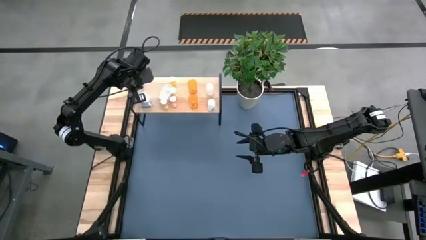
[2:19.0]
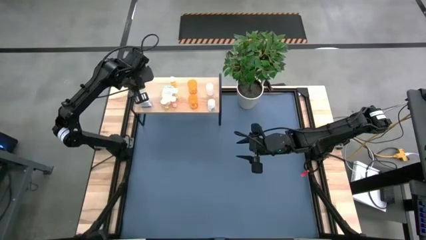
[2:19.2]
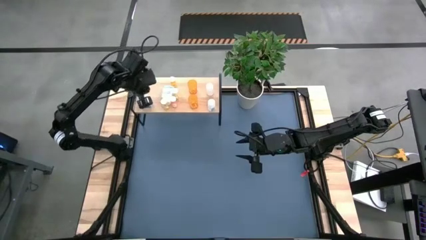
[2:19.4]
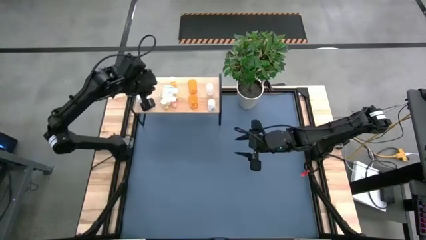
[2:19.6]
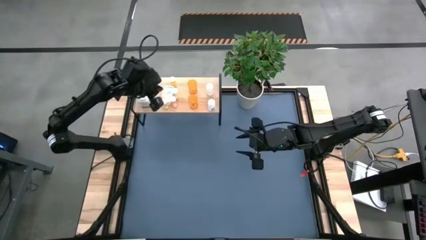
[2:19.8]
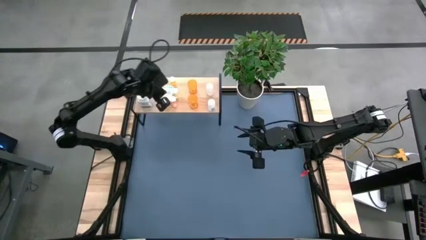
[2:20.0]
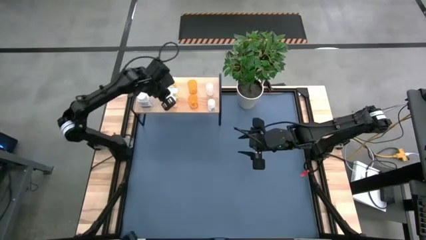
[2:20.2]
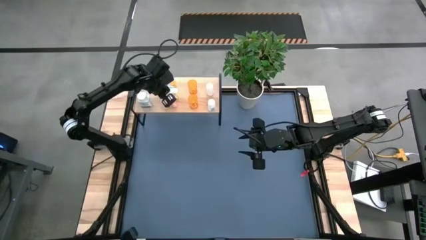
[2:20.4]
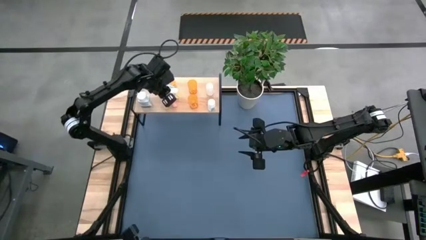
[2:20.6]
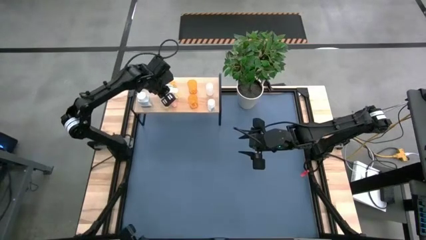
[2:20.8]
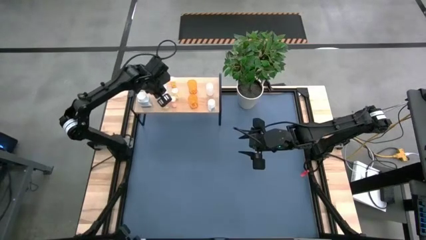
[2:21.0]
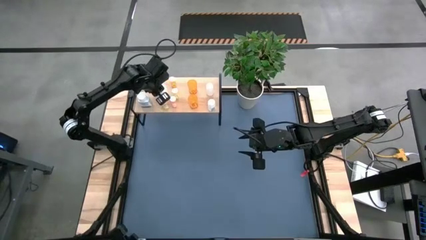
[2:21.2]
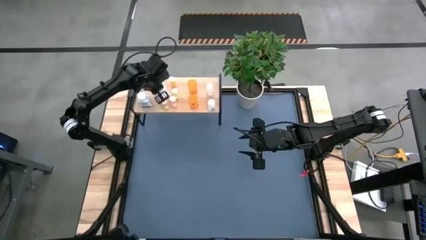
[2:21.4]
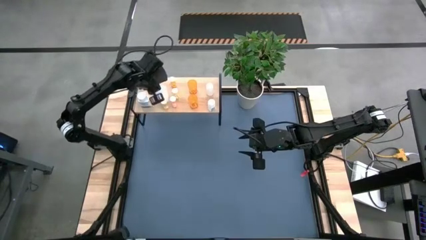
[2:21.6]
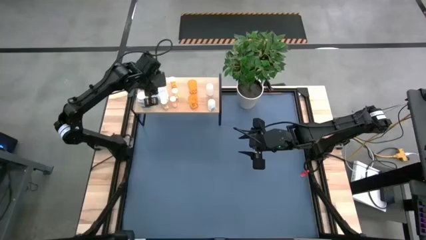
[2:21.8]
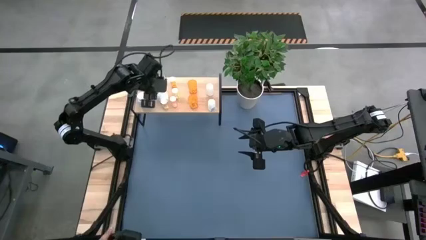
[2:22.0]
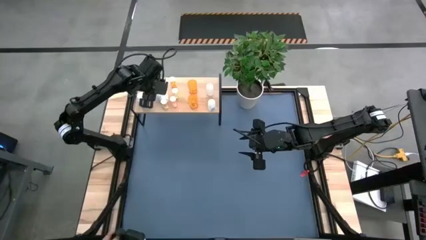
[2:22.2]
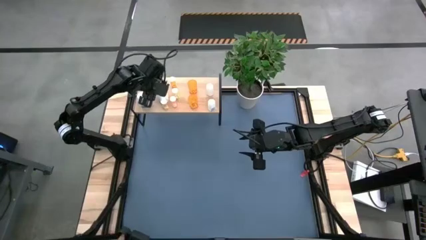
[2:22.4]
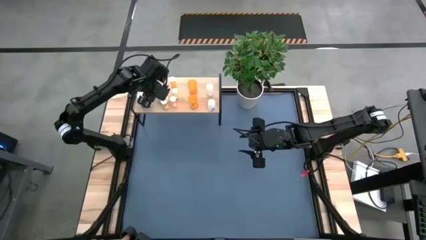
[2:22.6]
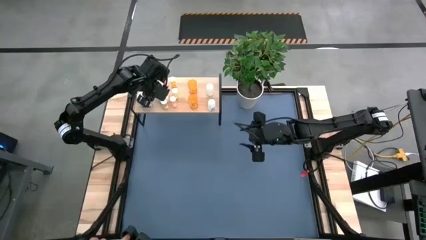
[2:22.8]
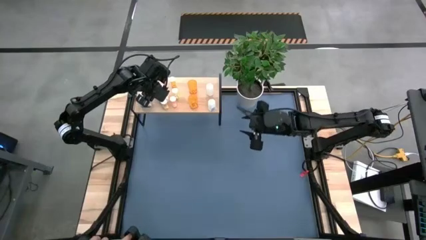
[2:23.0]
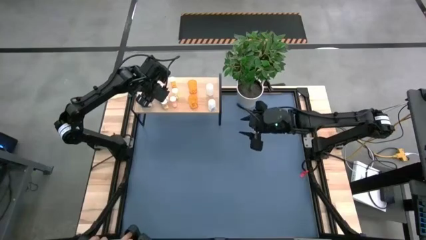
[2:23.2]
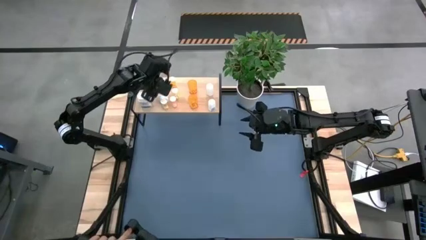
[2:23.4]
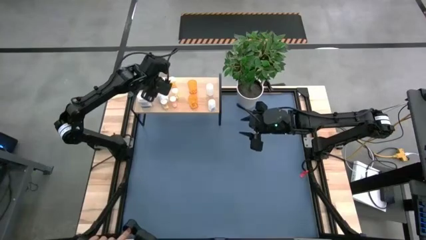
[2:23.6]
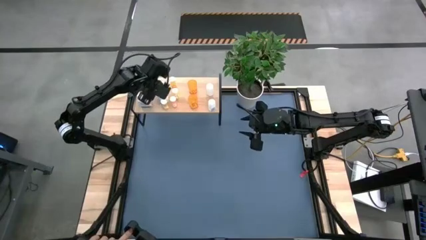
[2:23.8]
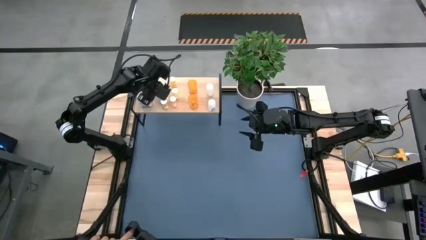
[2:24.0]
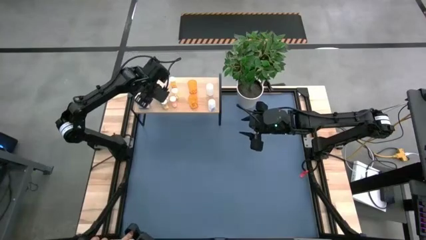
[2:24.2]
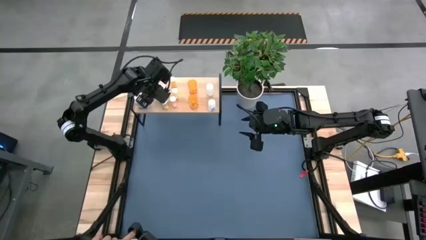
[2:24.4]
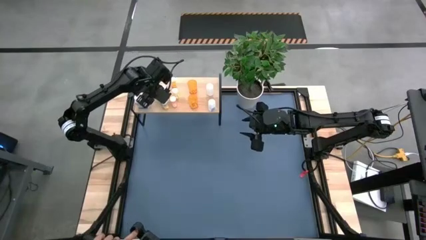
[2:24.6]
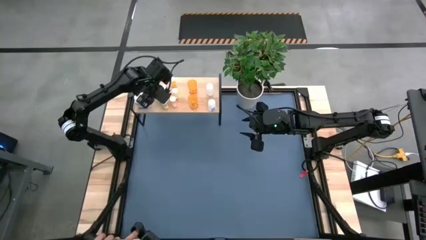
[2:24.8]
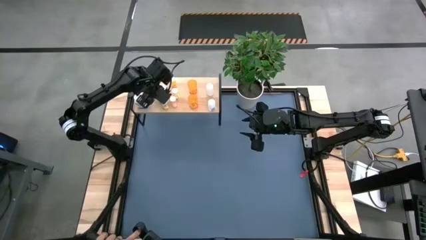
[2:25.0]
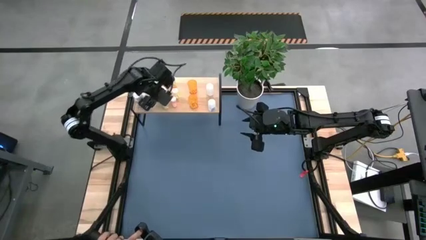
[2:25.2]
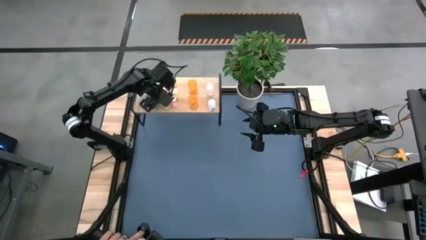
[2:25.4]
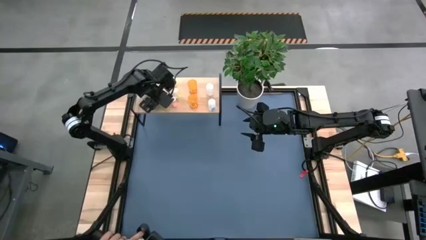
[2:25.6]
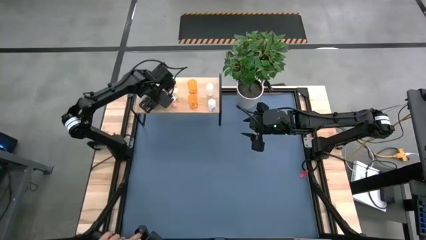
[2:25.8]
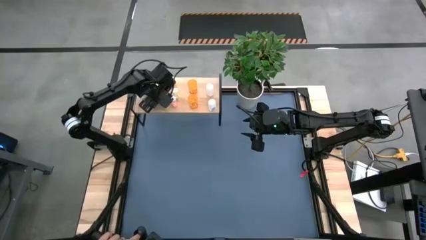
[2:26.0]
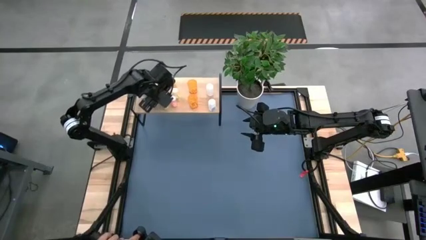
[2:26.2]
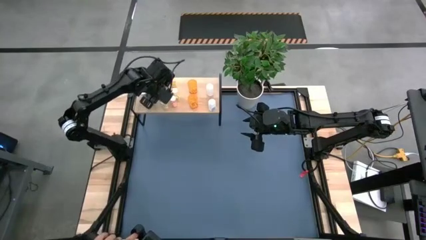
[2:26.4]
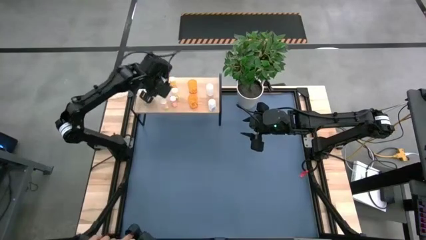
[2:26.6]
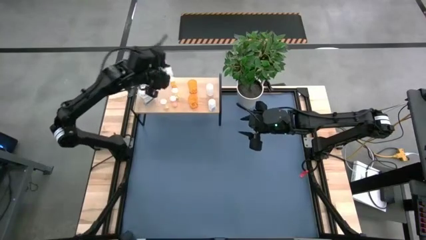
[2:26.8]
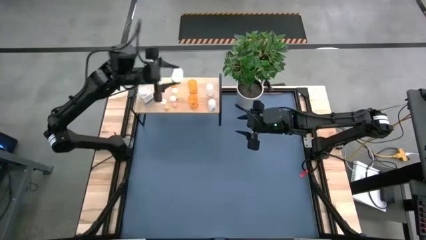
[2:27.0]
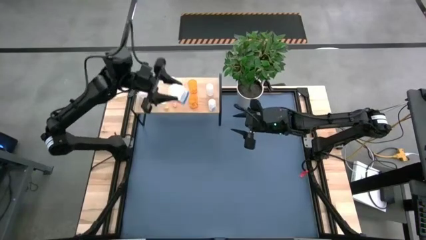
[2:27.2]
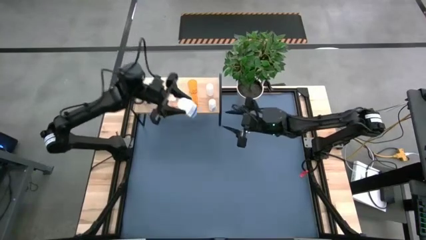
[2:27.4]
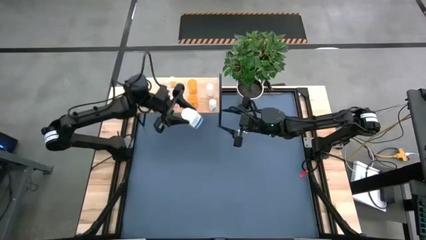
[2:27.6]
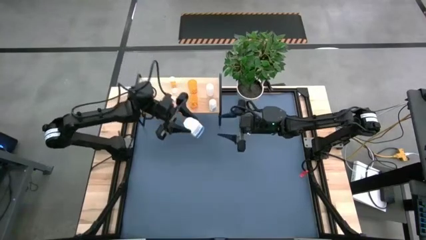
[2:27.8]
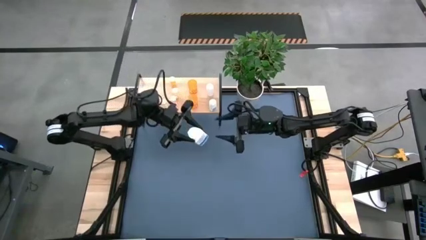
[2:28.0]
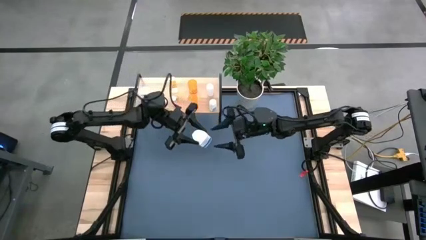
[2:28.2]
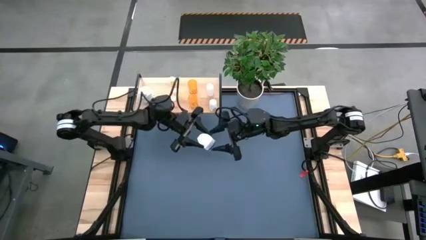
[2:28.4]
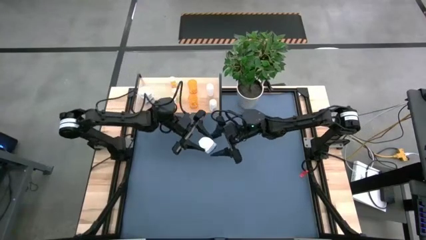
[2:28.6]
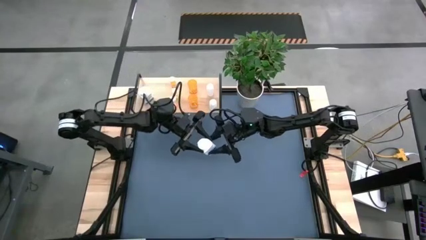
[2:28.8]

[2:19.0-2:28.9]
Task: Pick and place medicine bottles onto shelf by color
Put the white pill bottle on the shelf

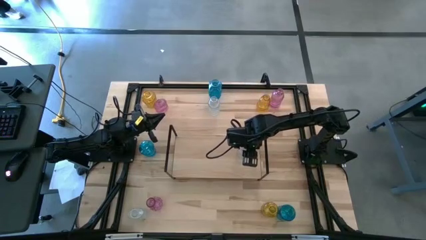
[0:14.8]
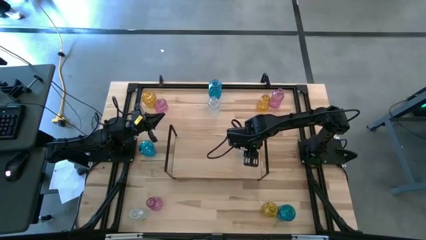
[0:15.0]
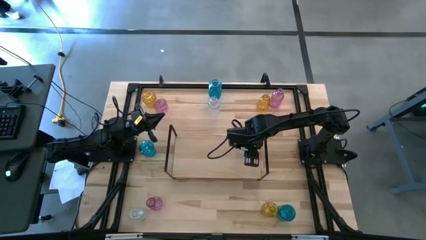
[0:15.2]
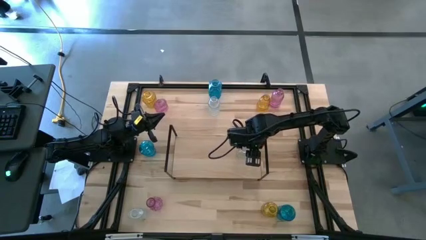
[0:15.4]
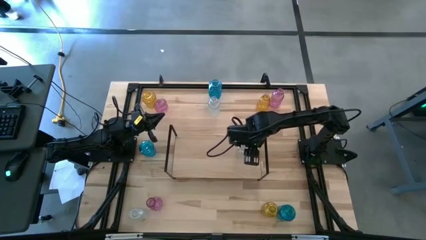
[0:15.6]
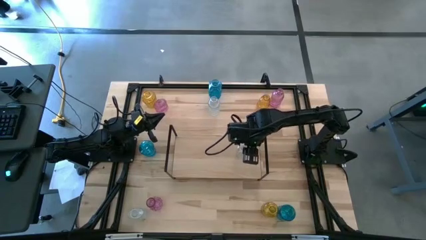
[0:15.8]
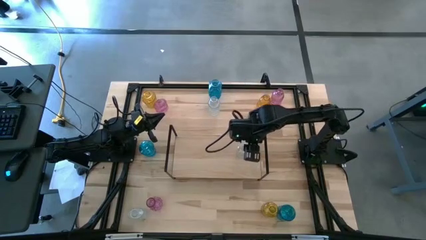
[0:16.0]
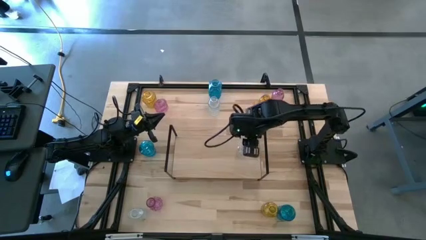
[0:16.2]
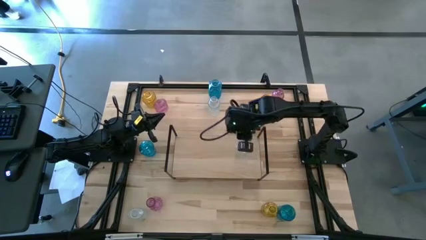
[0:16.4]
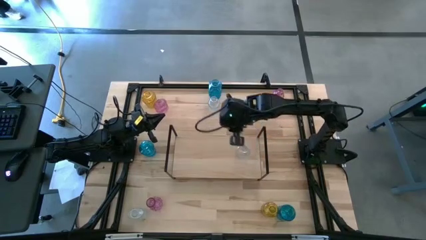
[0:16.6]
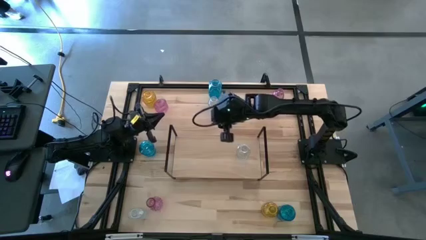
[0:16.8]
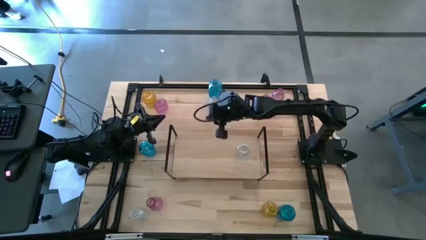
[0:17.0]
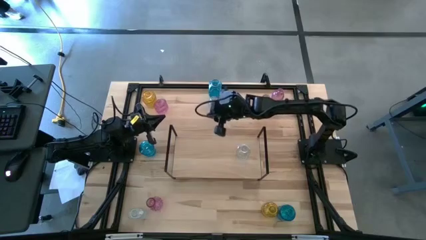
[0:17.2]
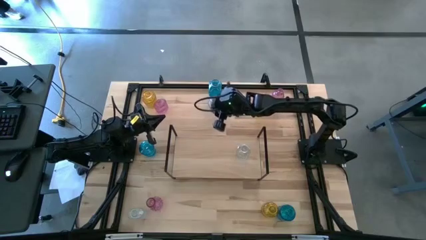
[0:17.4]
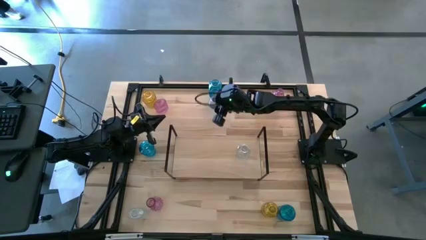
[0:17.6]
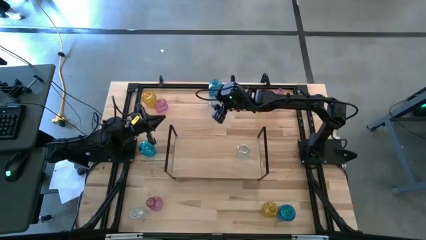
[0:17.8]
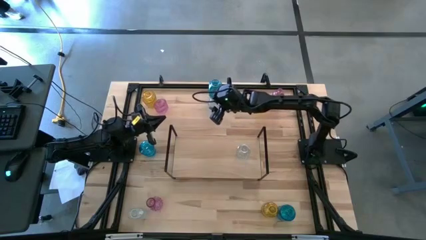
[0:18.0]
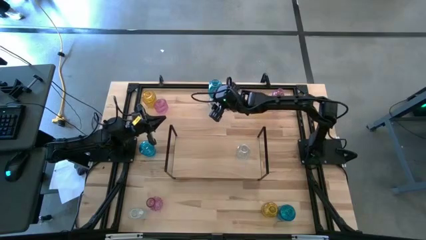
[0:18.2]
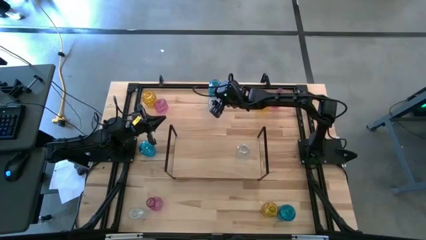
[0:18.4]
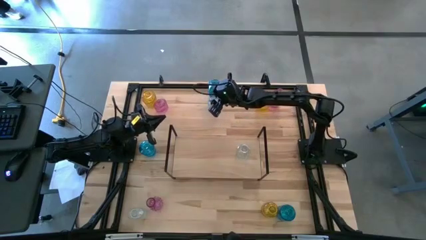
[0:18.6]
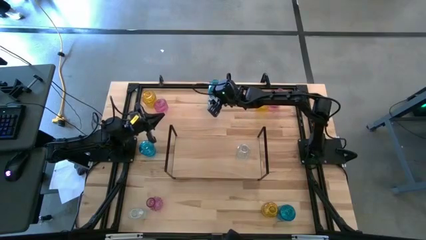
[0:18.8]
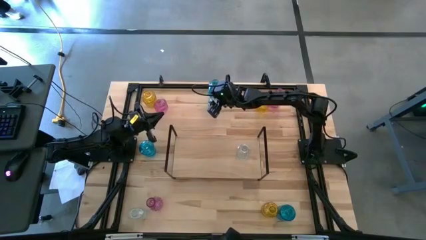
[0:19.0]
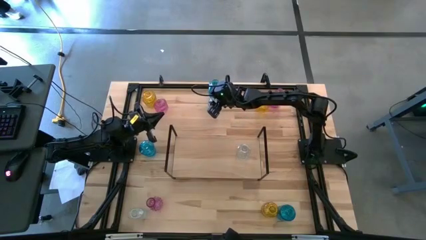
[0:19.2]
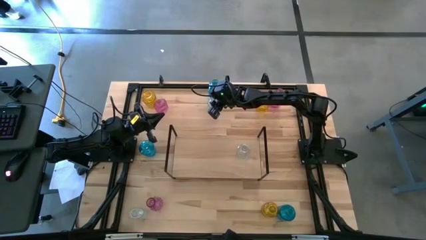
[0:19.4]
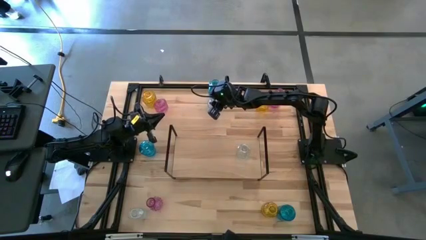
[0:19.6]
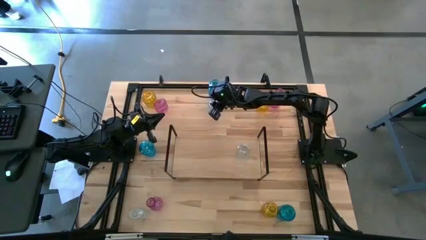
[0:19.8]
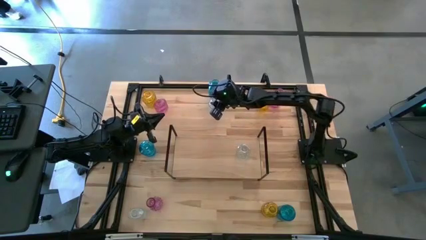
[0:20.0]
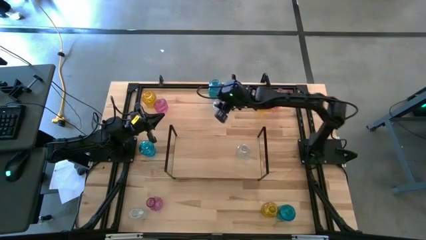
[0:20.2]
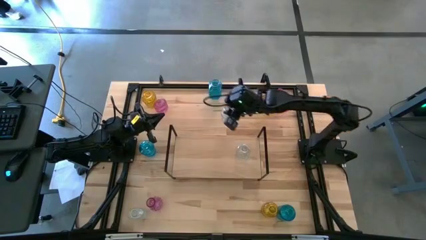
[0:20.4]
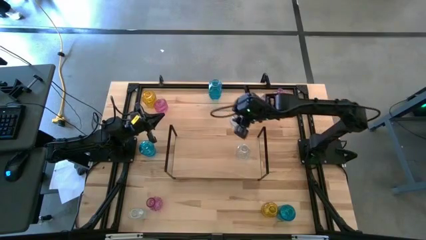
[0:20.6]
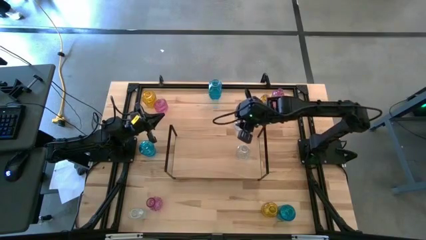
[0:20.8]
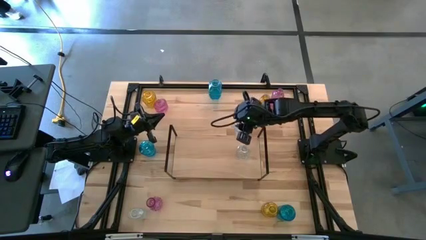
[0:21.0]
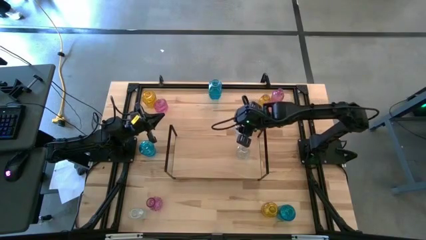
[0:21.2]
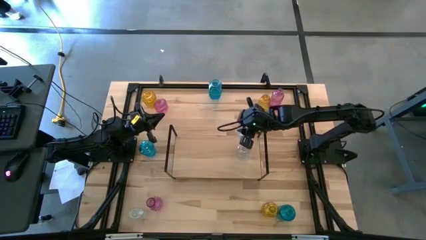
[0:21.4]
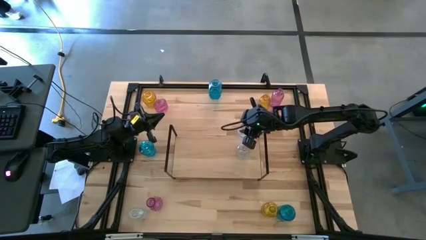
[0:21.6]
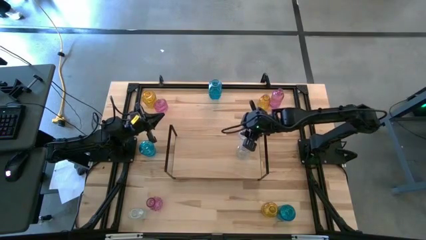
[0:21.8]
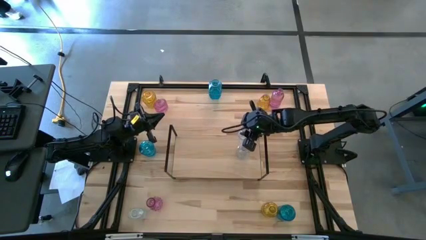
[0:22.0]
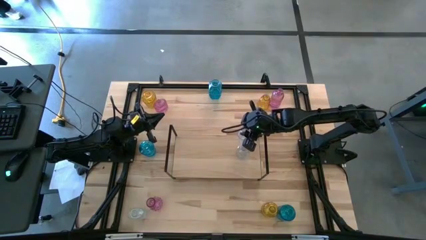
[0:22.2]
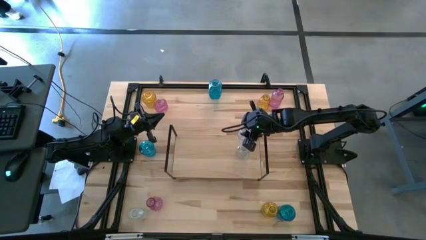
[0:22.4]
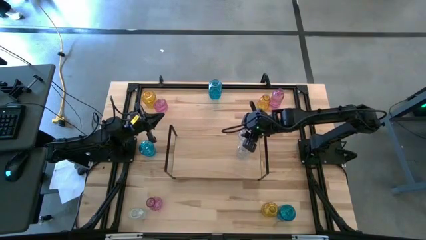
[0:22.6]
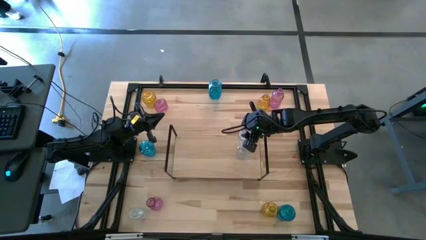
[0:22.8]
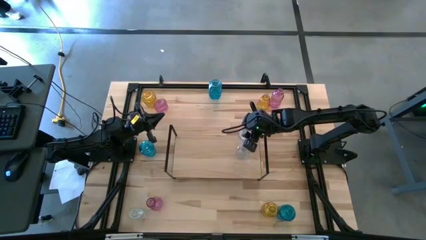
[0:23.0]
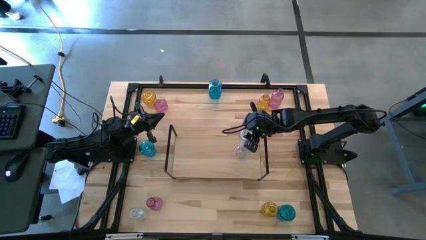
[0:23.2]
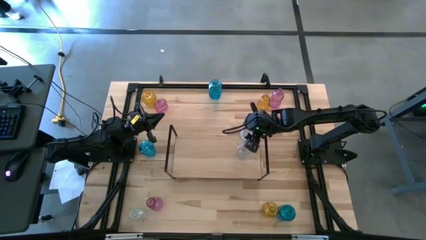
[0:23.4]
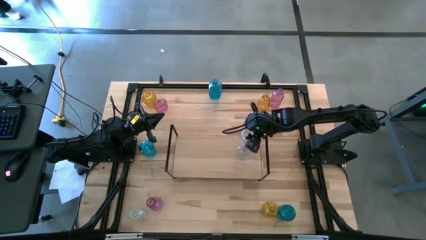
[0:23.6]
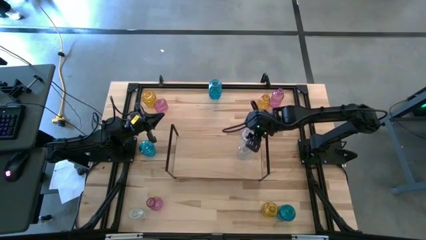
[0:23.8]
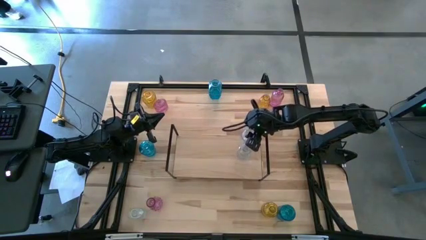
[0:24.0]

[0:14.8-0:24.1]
Task: sort vases onto shelf
Put the top transparent vase on the shelf aligned with the other transparent vase
